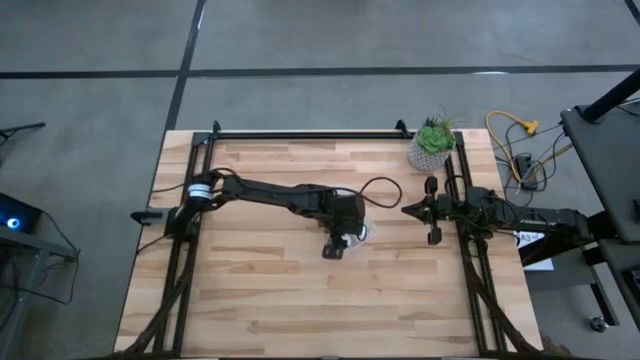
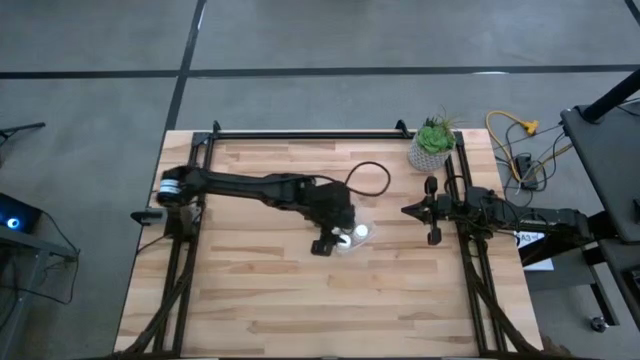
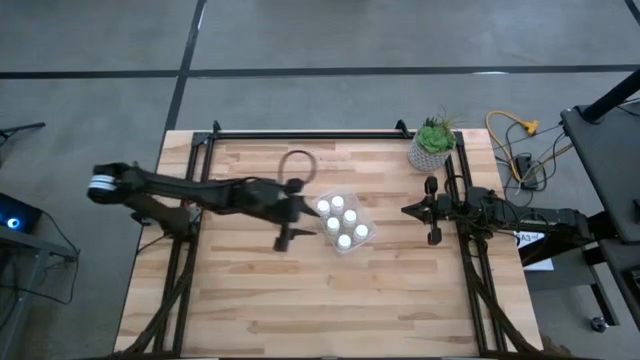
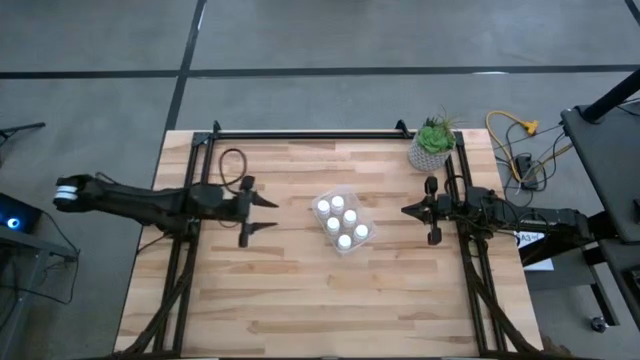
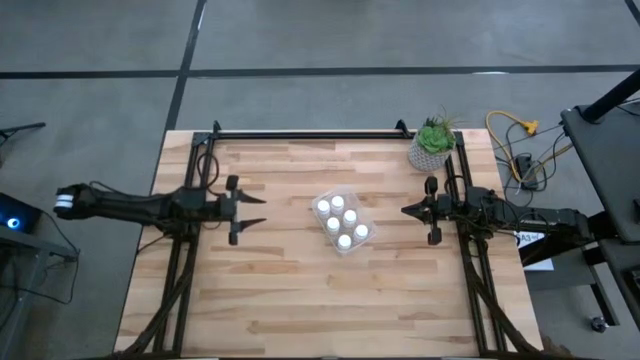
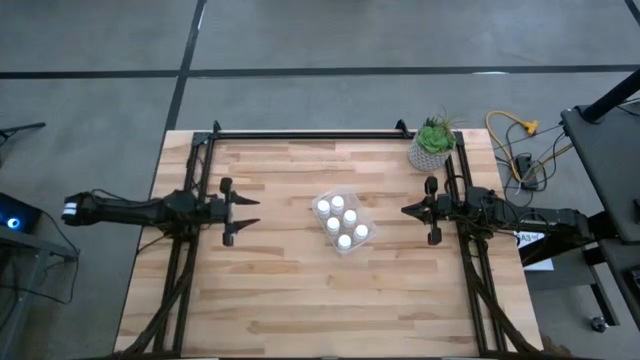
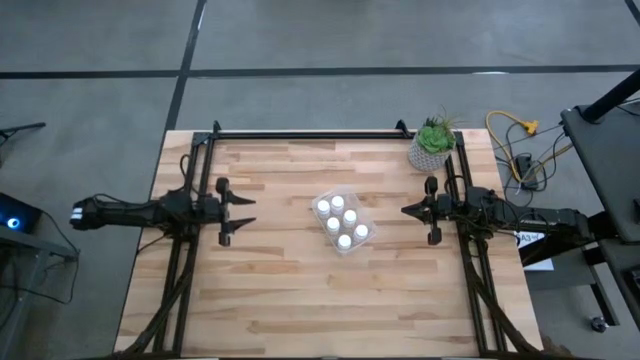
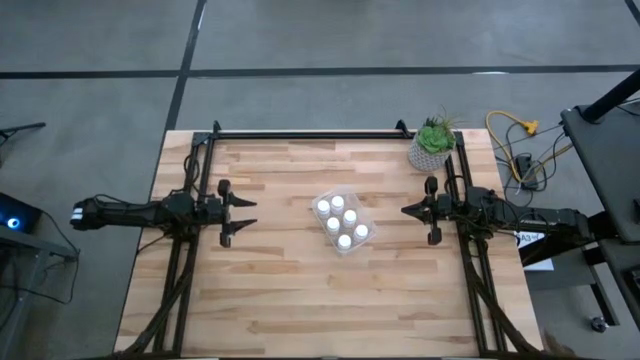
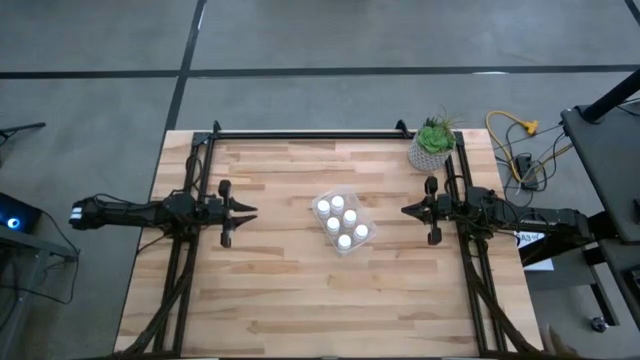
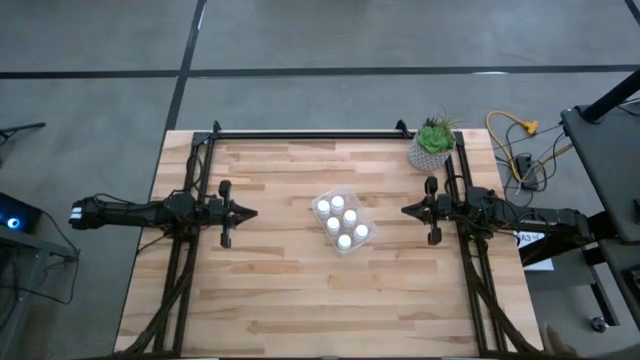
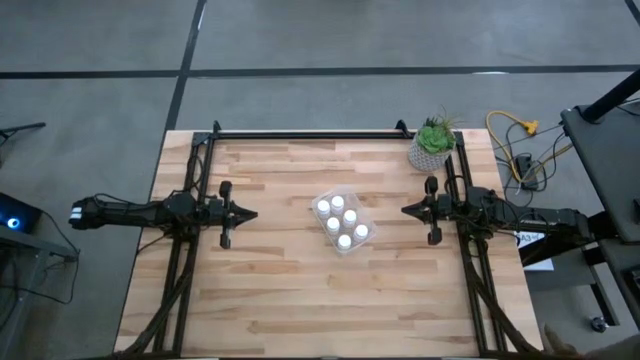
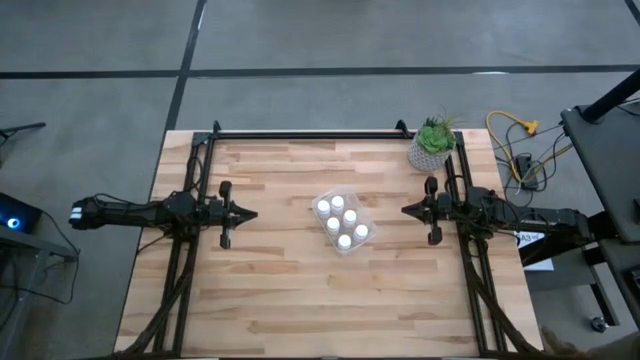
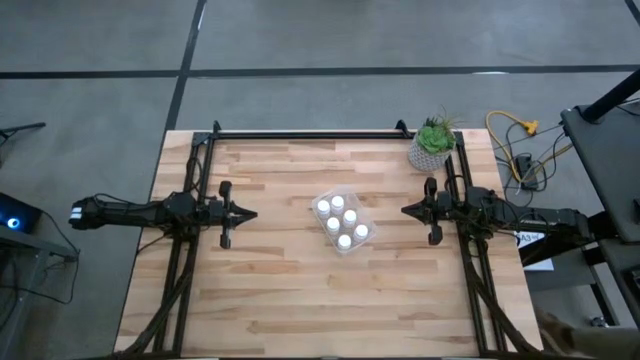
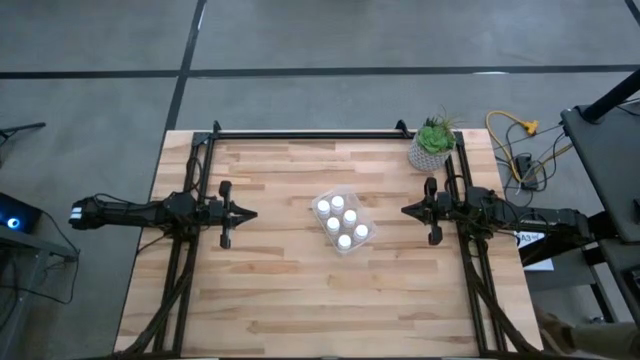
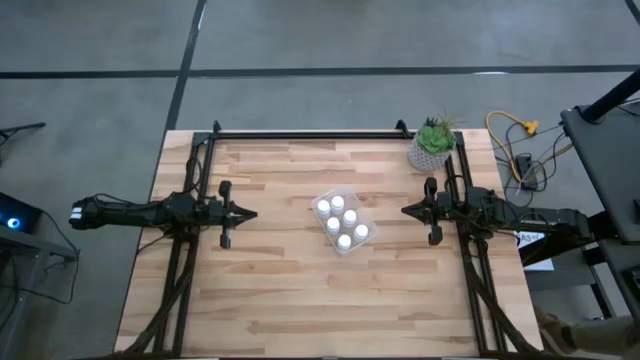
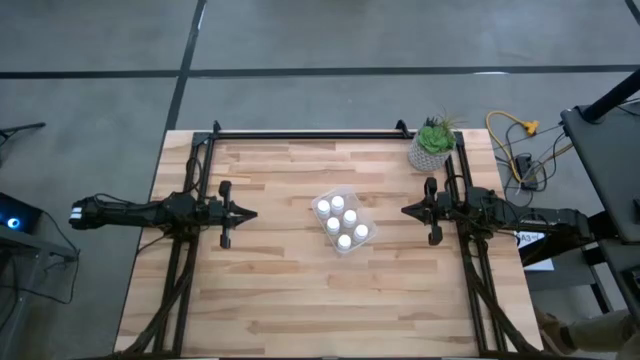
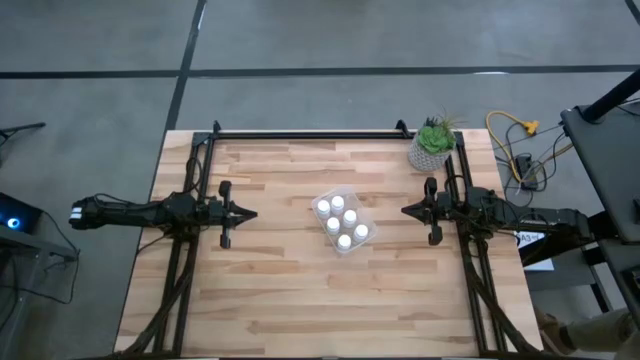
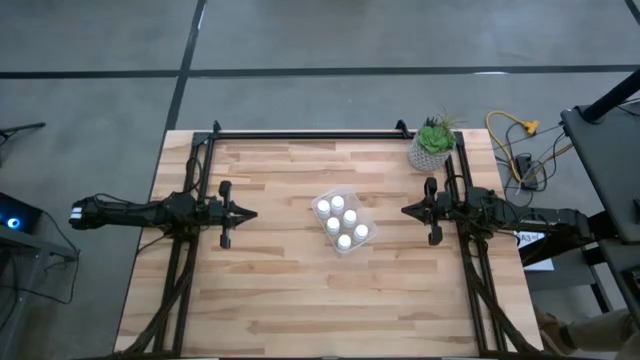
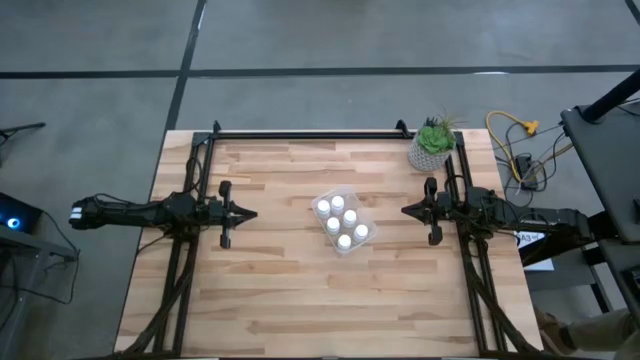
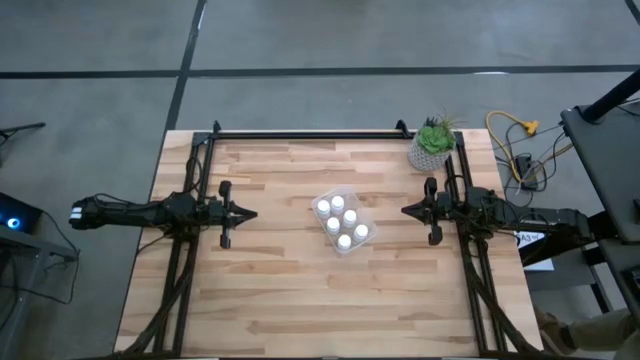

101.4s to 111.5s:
Task: Pick and place pill bottles into a basket
Return to Home Position

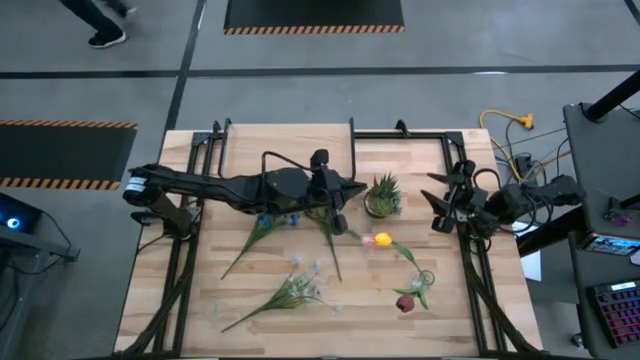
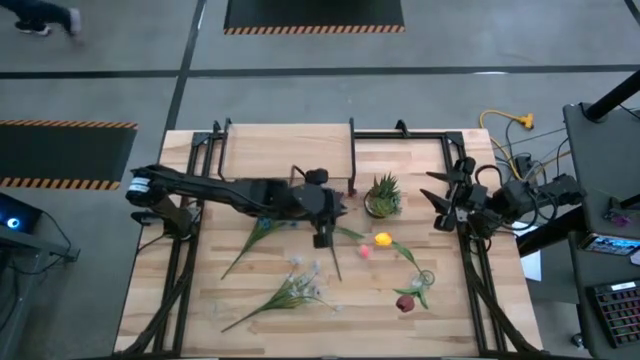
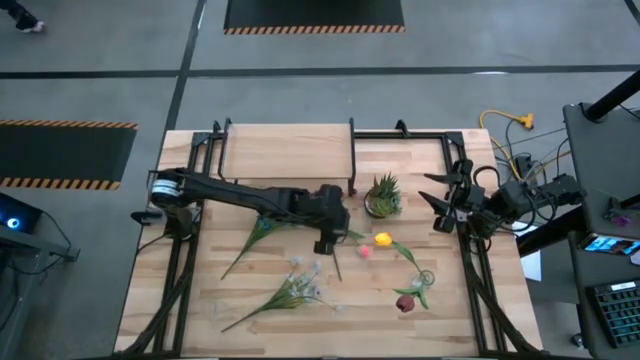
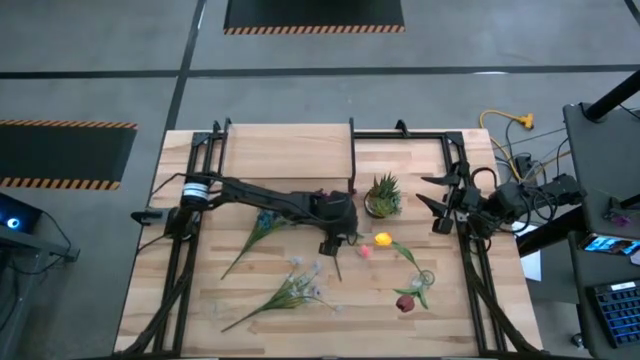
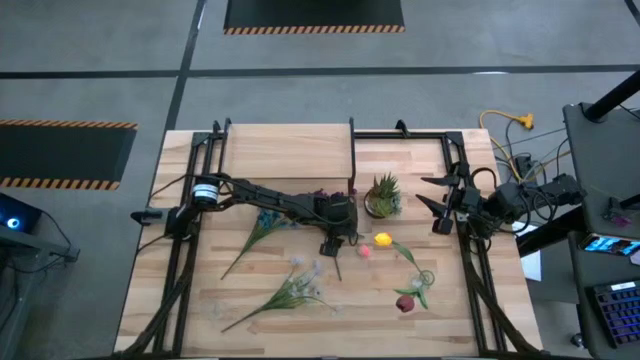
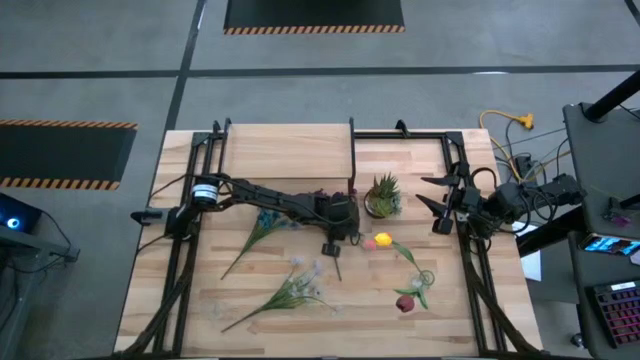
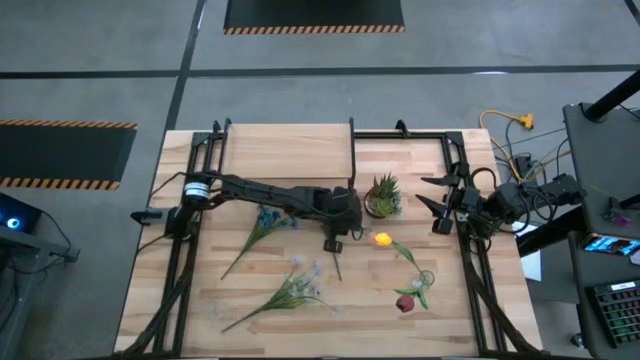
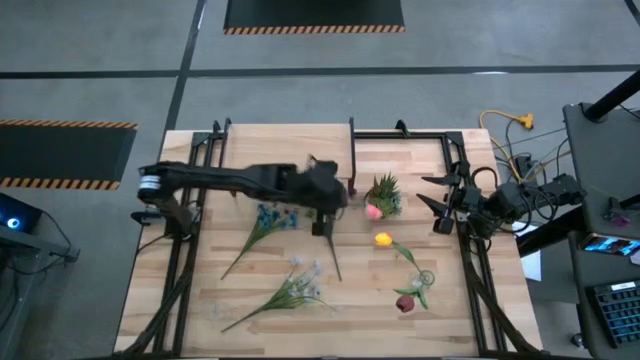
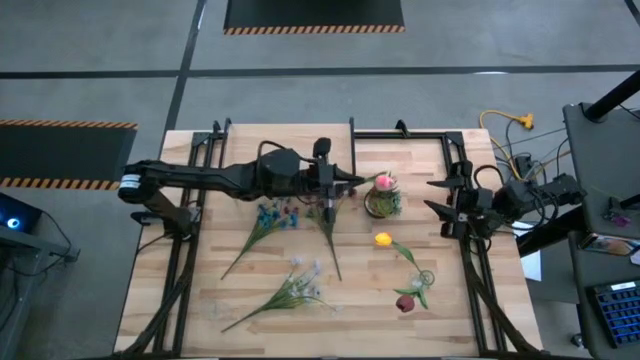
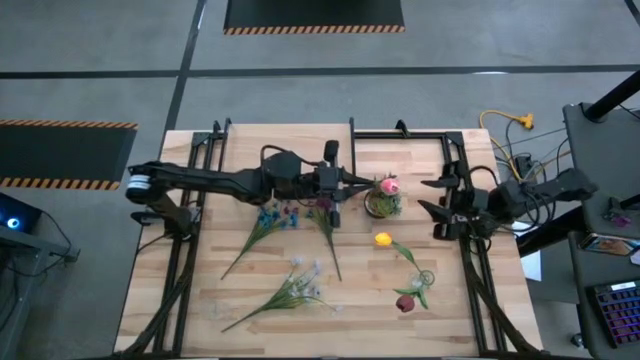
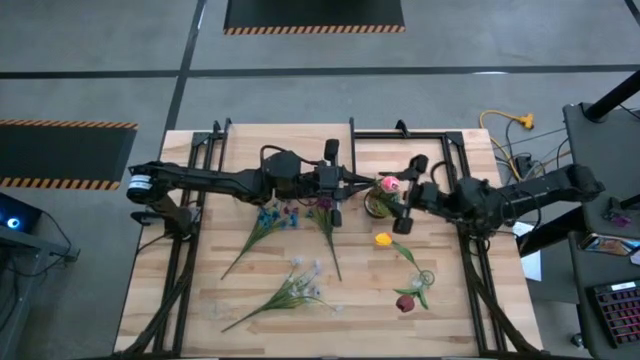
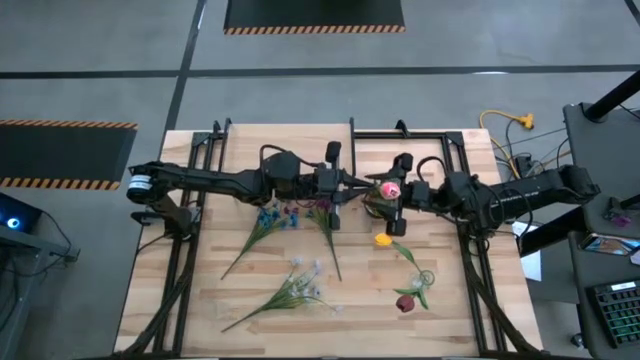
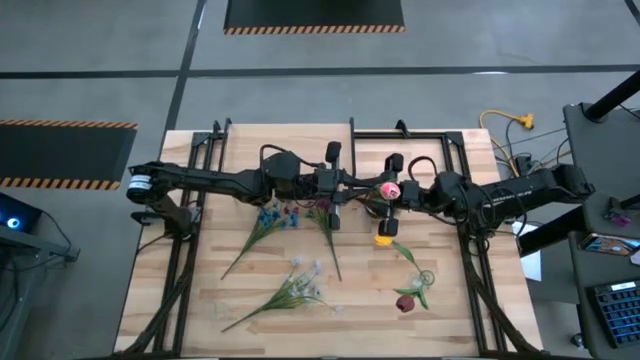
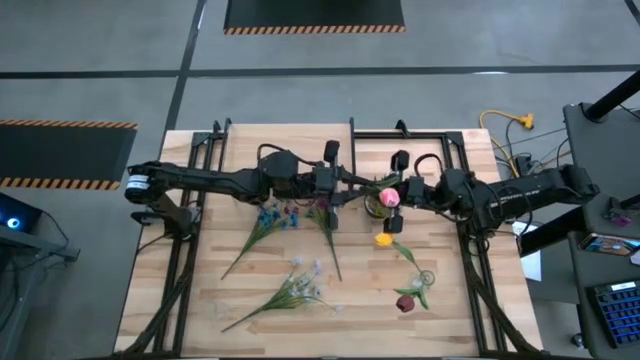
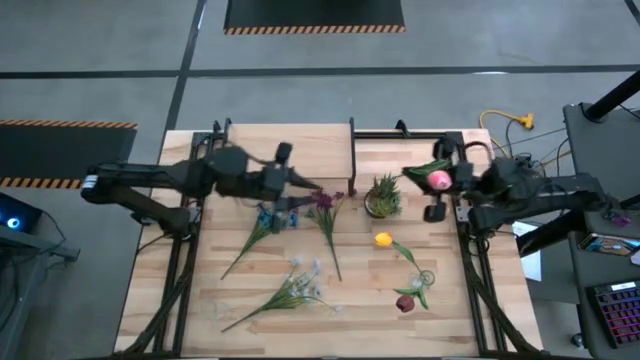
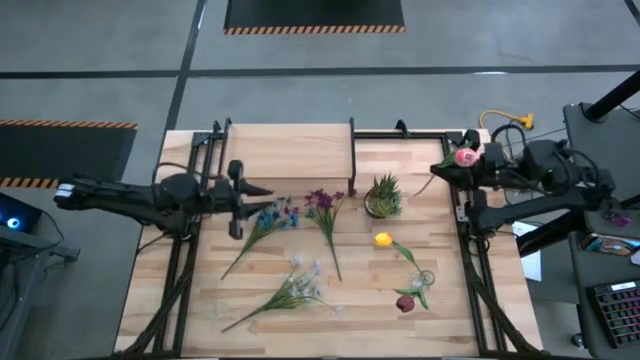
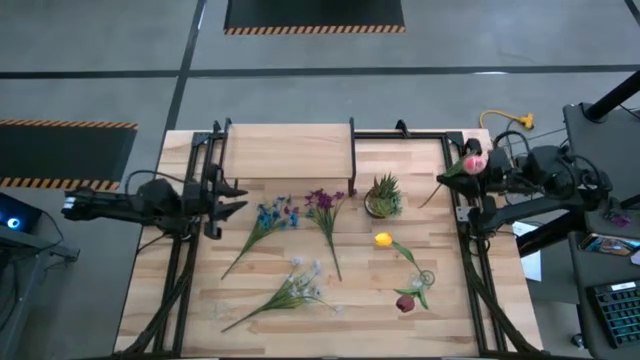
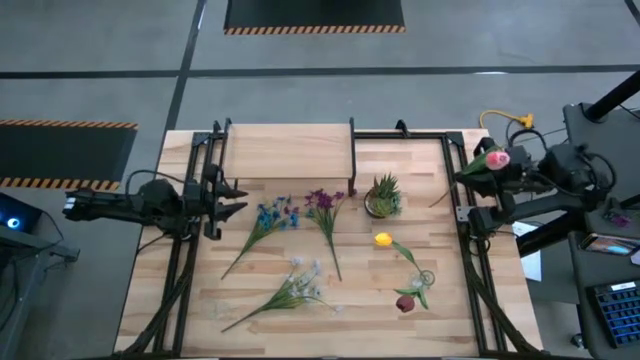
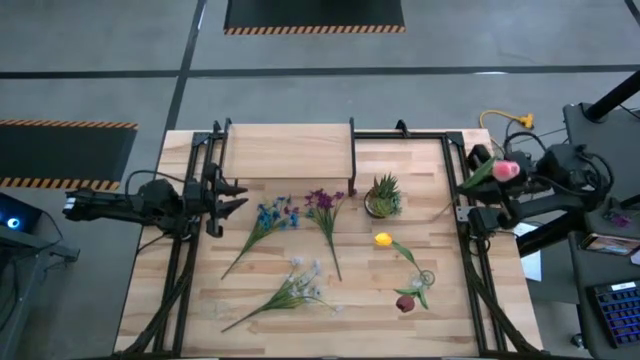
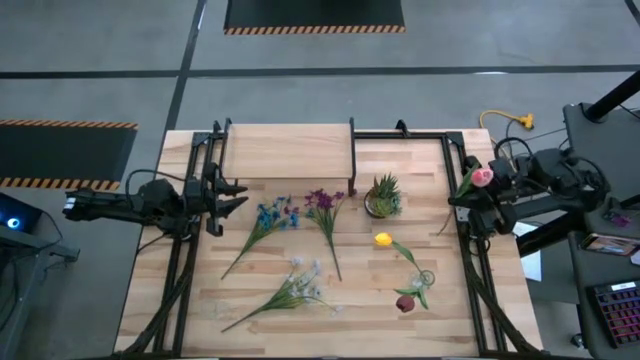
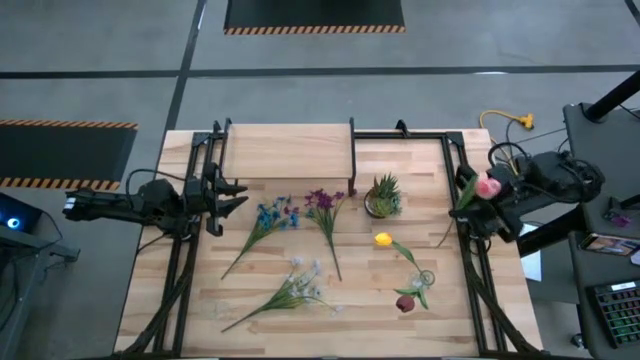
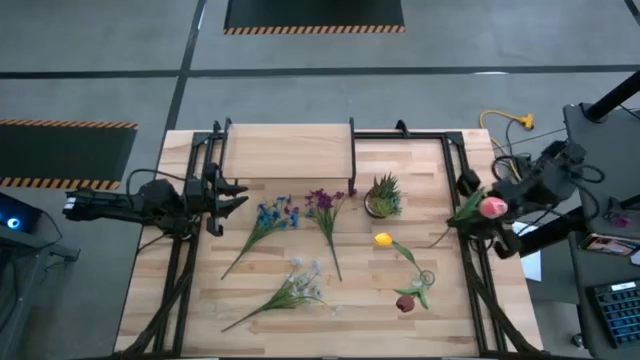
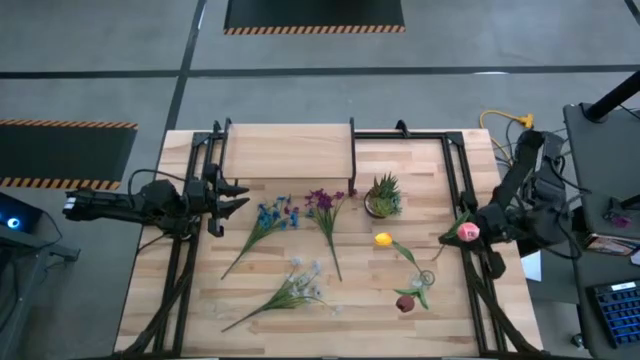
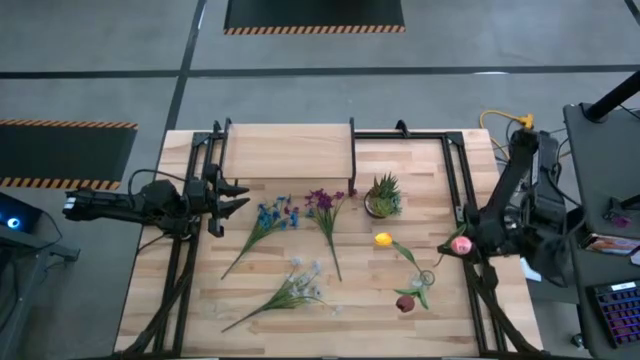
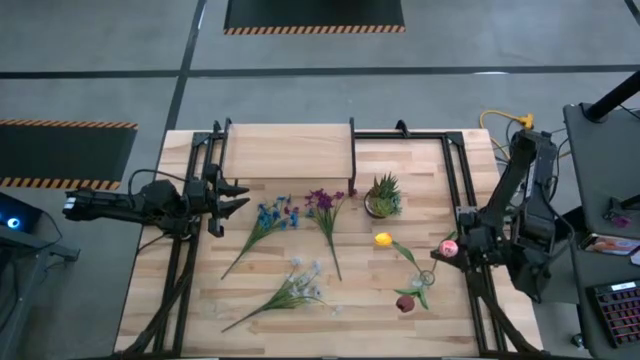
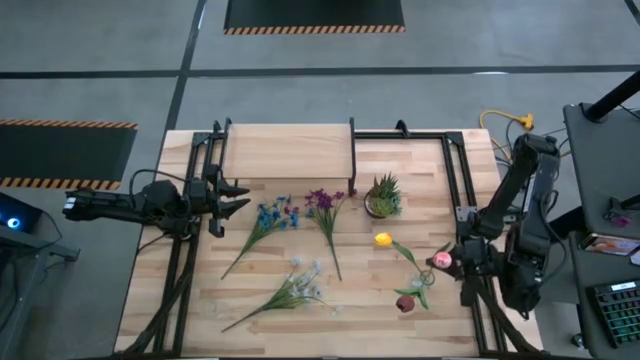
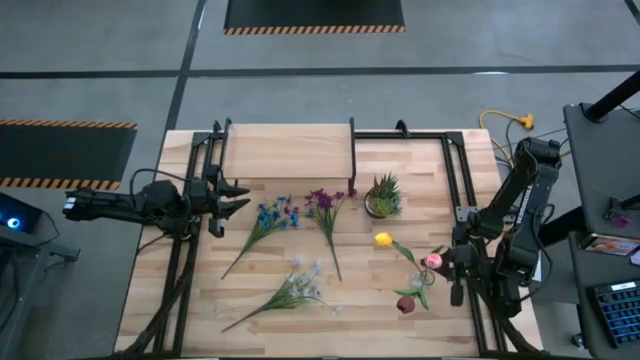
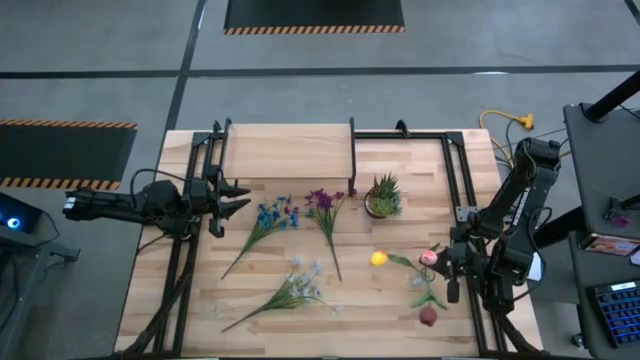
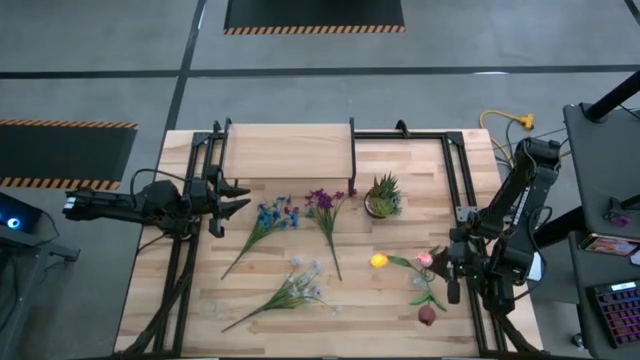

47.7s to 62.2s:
Task: Pick and place flowers into a vace then onto a shelf
Put the pink tulip into the right transparent vase
